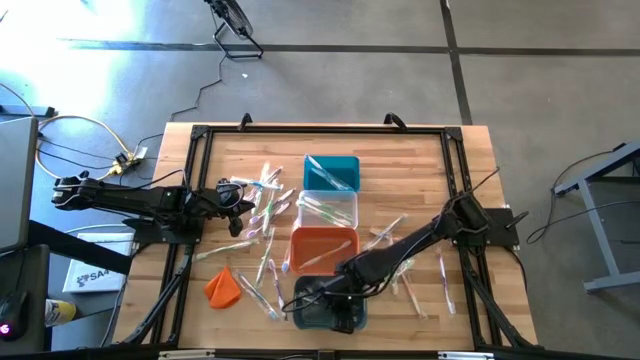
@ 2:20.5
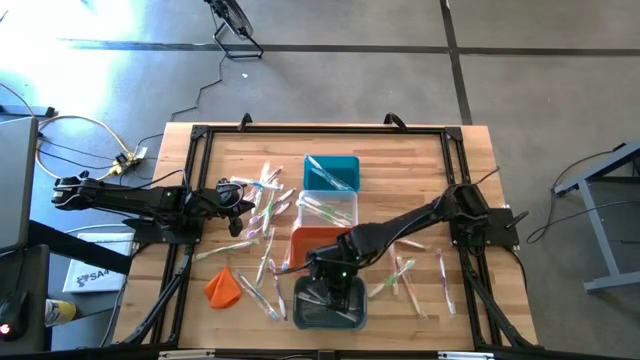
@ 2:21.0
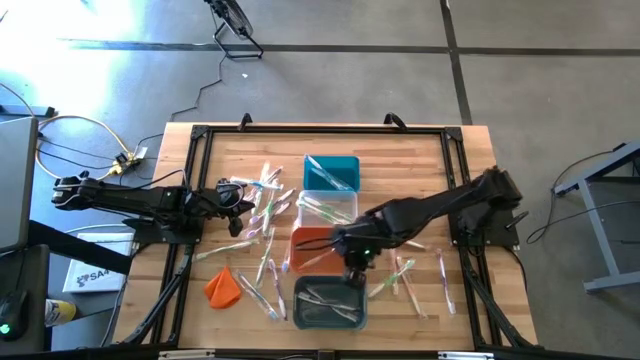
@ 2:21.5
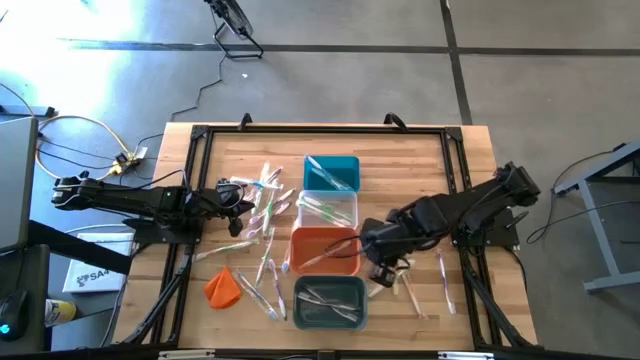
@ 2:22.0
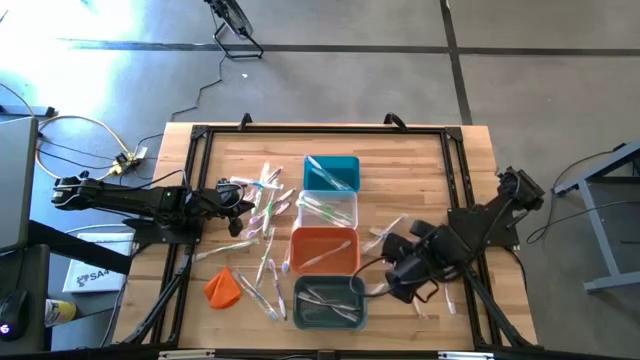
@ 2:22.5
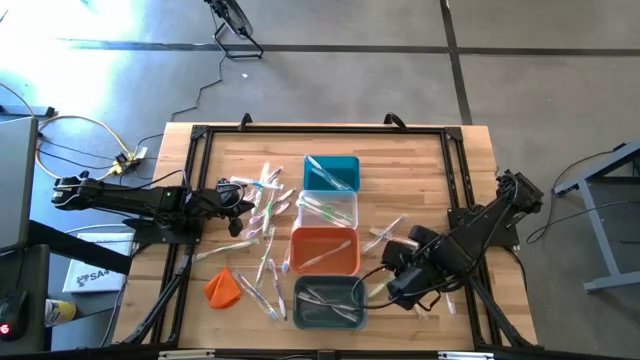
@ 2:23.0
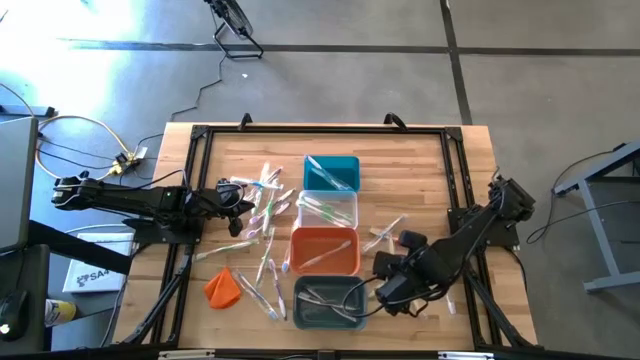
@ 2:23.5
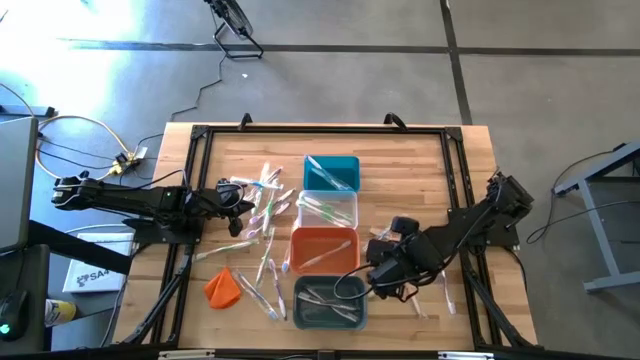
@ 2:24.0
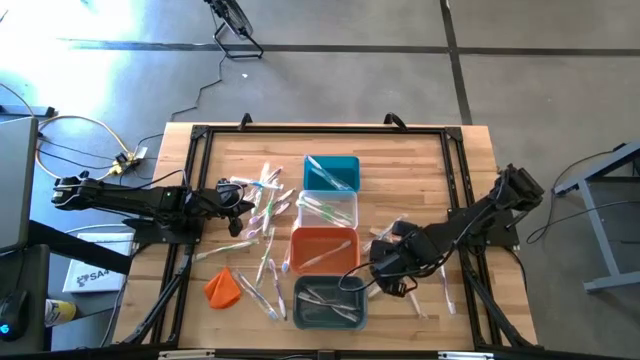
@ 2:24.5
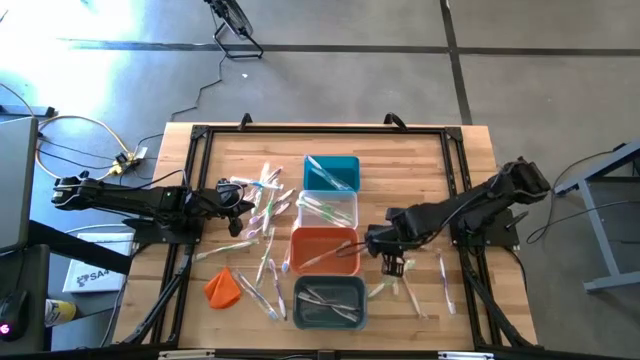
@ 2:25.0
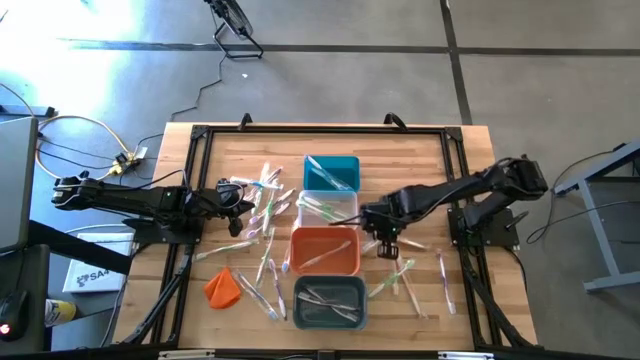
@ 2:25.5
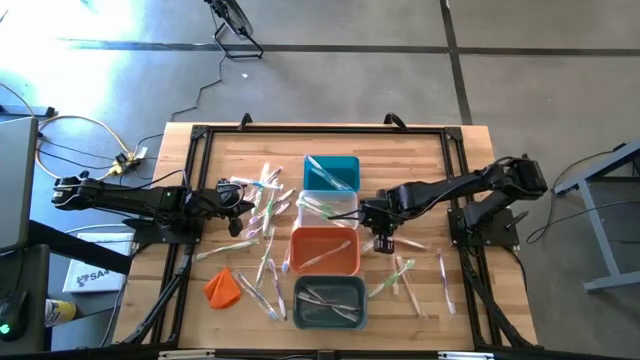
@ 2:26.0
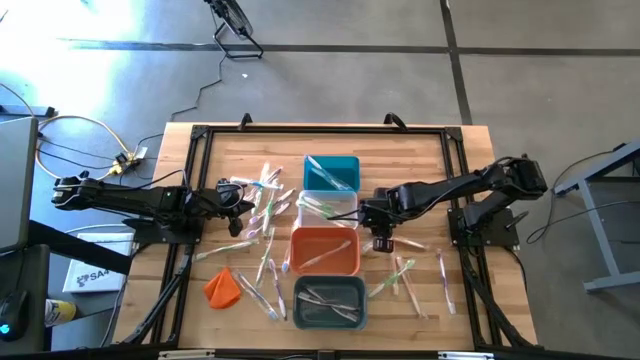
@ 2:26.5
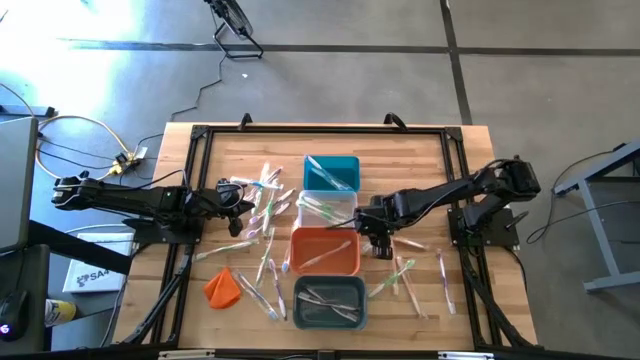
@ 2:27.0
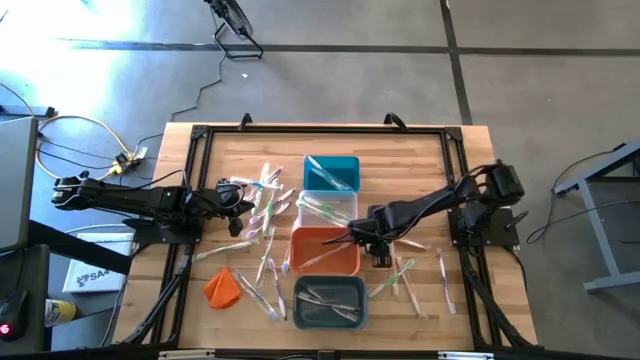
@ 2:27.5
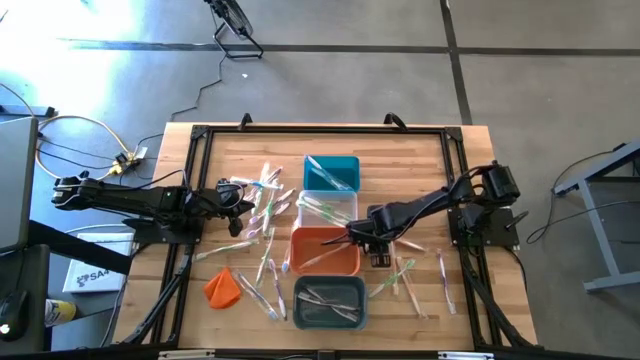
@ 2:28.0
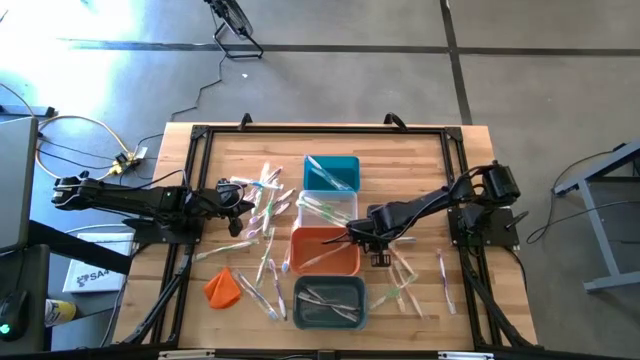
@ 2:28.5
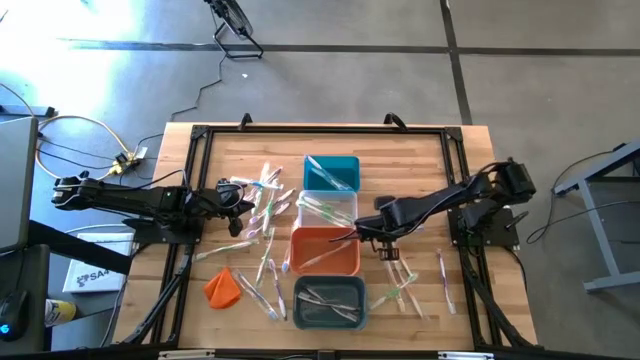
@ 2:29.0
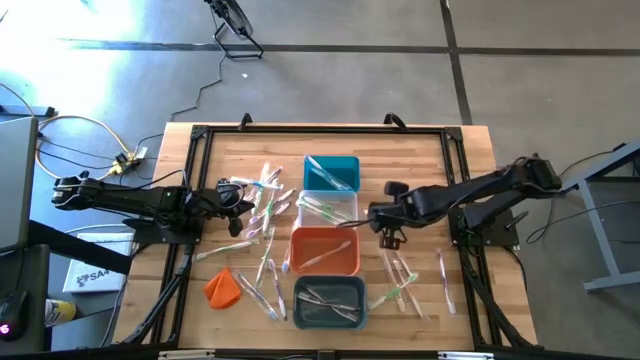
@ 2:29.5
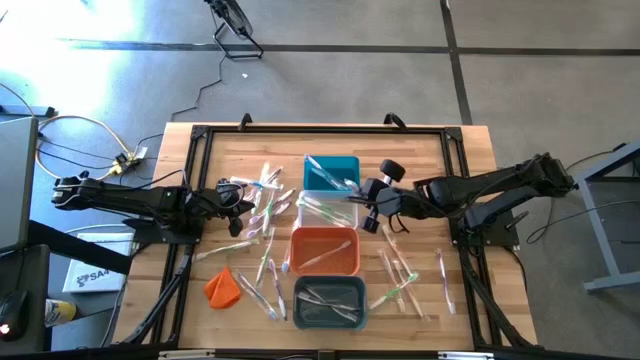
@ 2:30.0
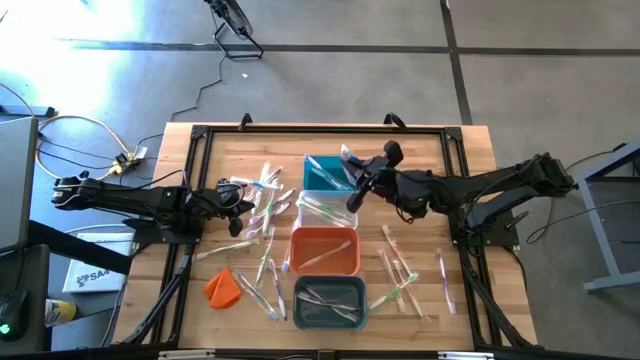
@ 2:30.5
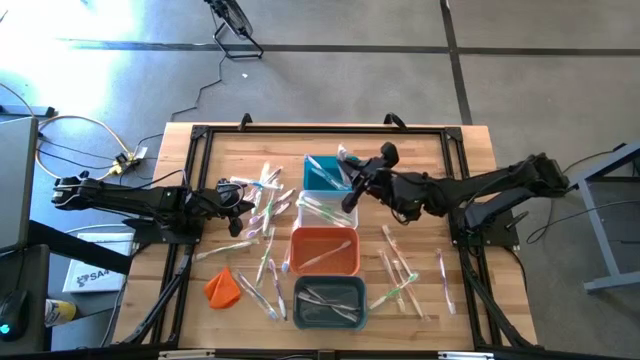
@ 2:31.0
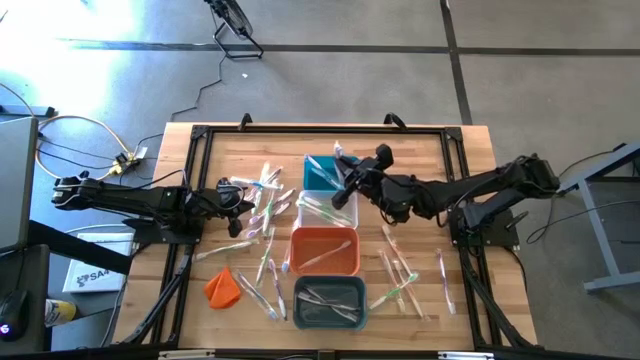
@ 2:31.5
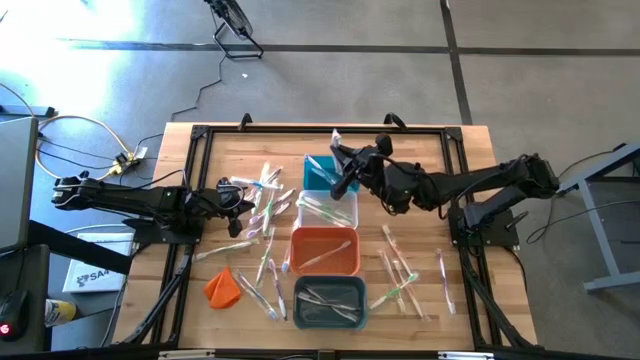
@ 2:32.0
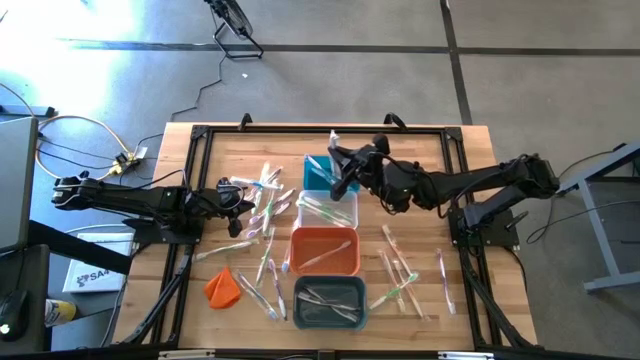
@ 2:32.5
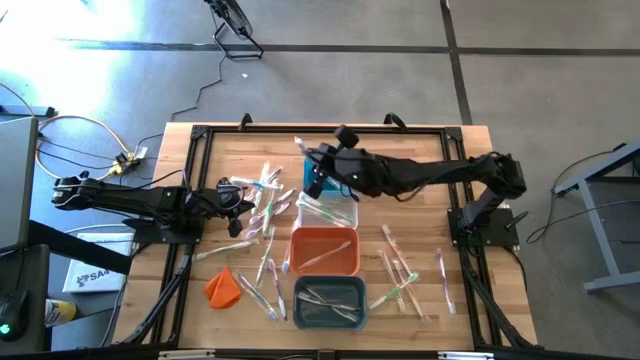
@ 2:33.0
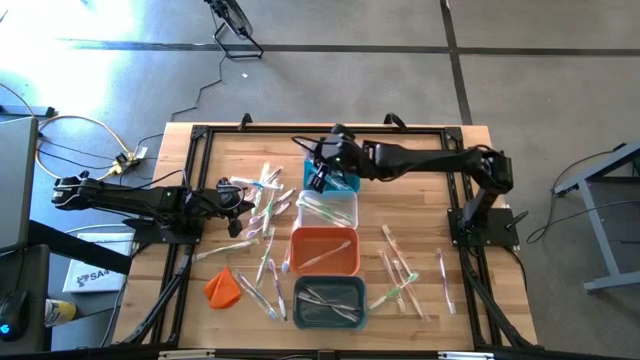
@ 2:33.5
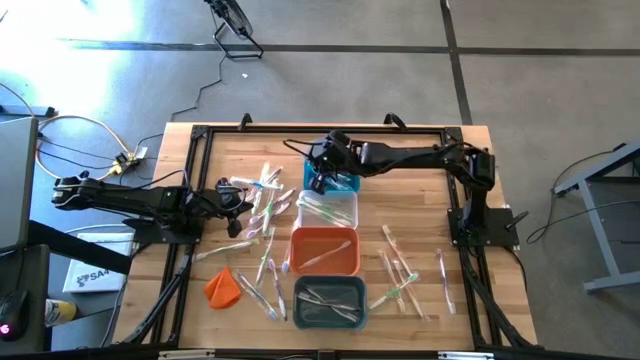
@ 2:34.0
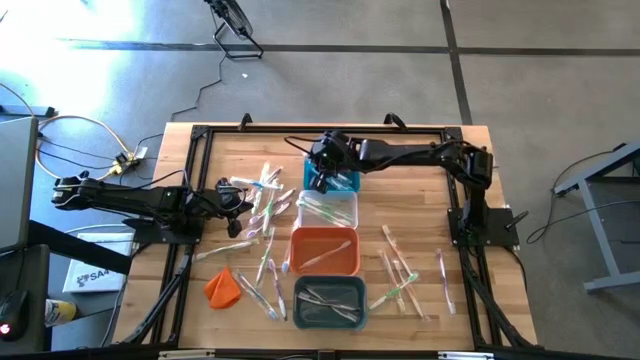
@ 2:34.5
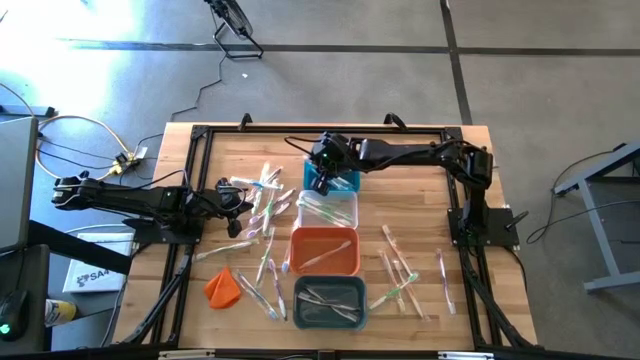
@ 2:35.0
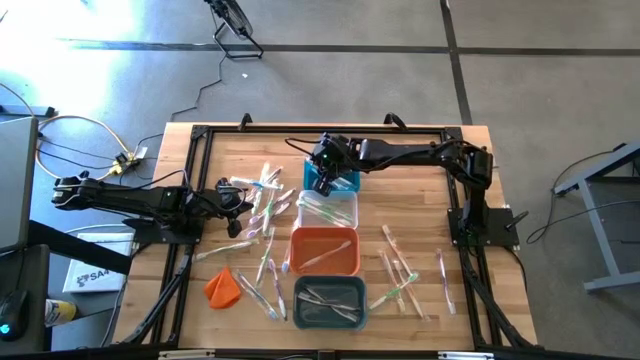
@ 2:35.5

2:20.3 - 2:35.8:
Task: Pick & Place Toothbrushes
Put the blue toothbrush into the blue bin

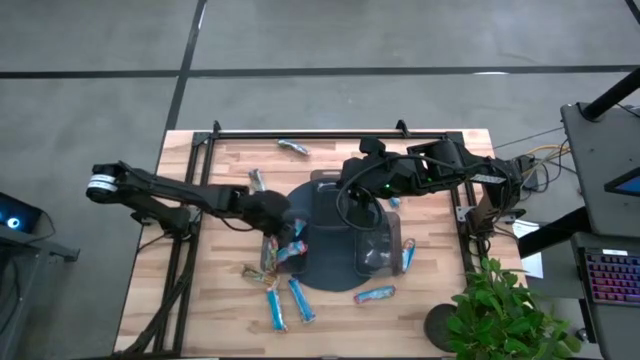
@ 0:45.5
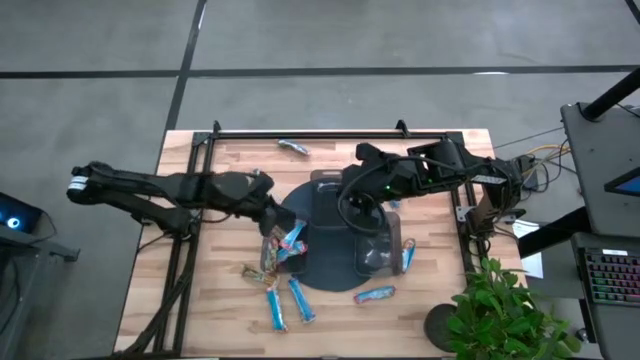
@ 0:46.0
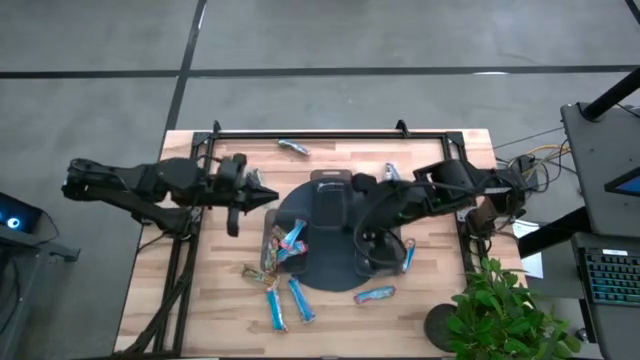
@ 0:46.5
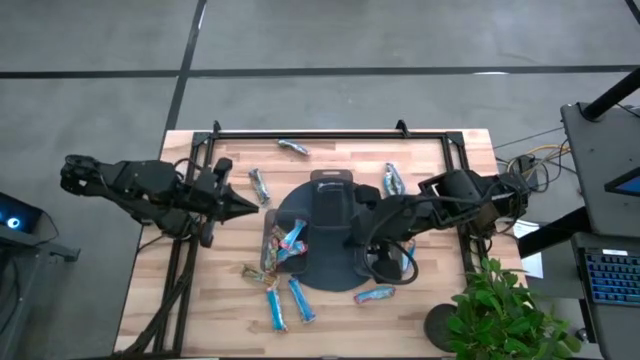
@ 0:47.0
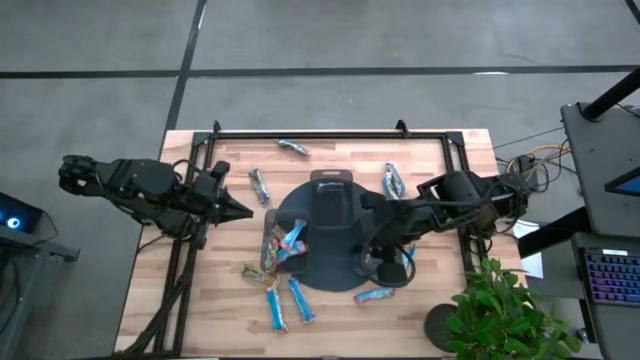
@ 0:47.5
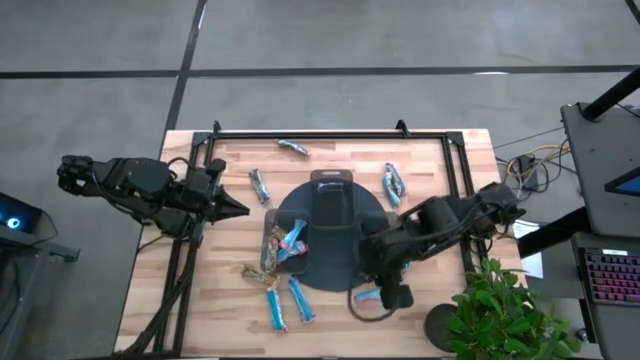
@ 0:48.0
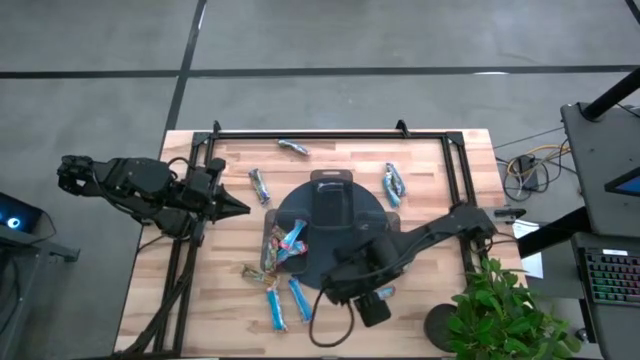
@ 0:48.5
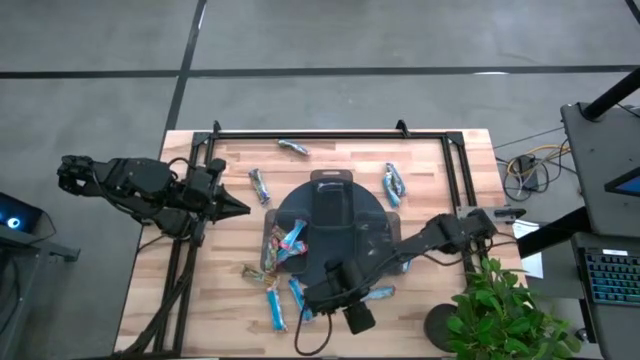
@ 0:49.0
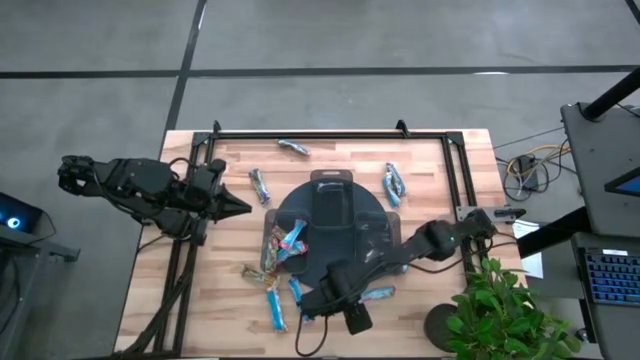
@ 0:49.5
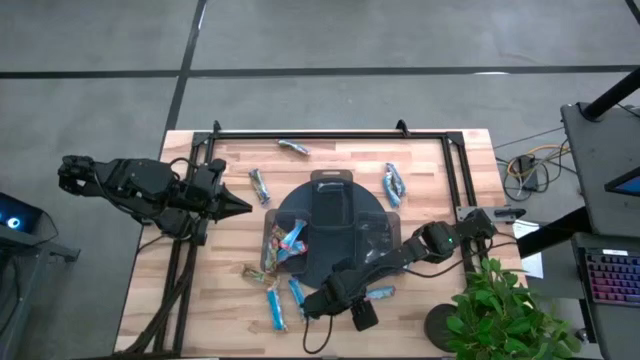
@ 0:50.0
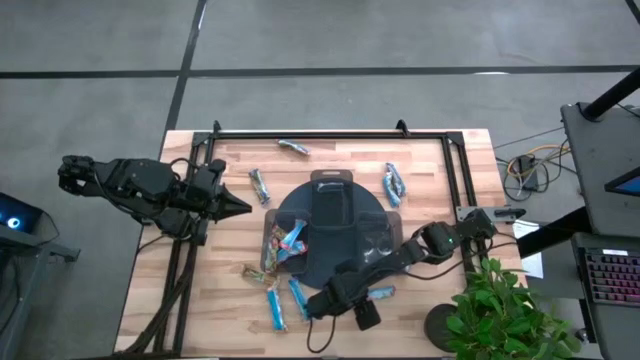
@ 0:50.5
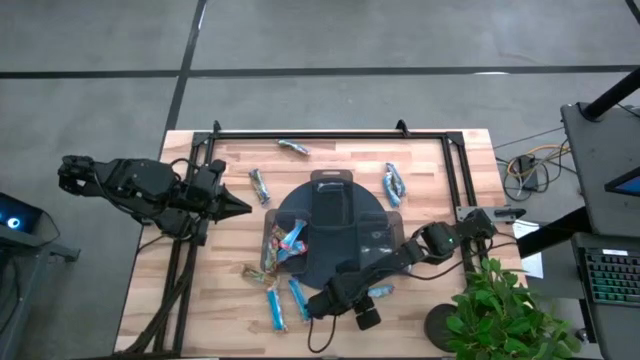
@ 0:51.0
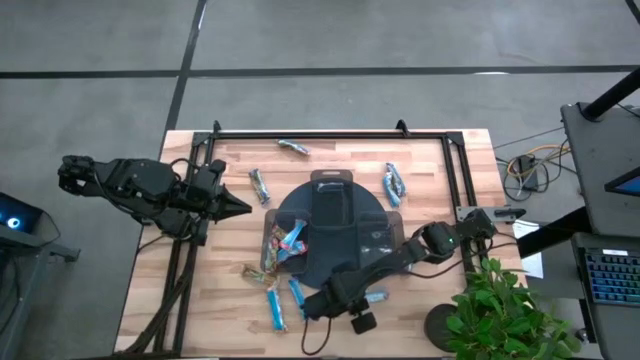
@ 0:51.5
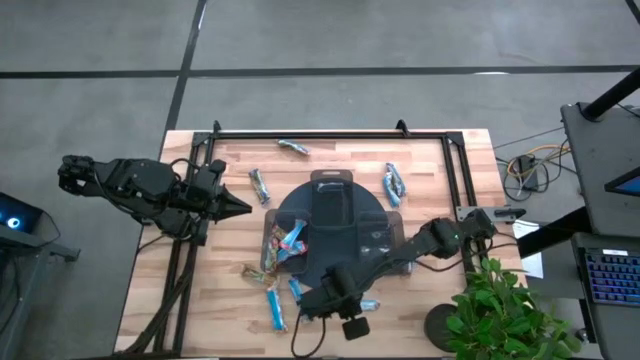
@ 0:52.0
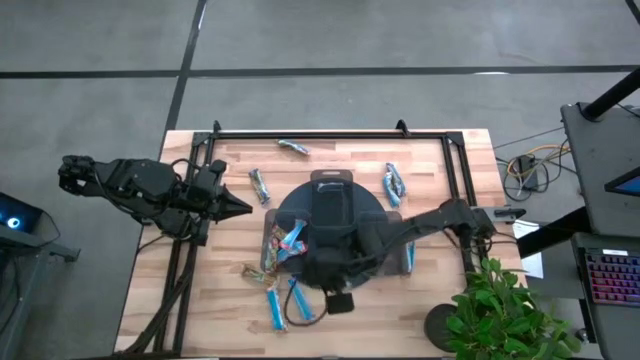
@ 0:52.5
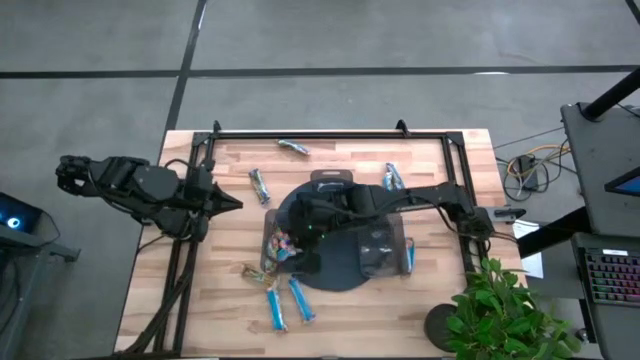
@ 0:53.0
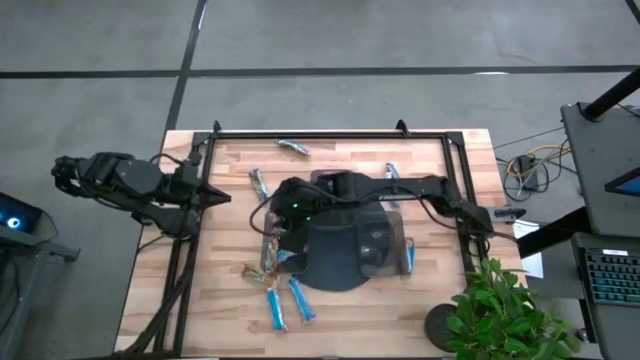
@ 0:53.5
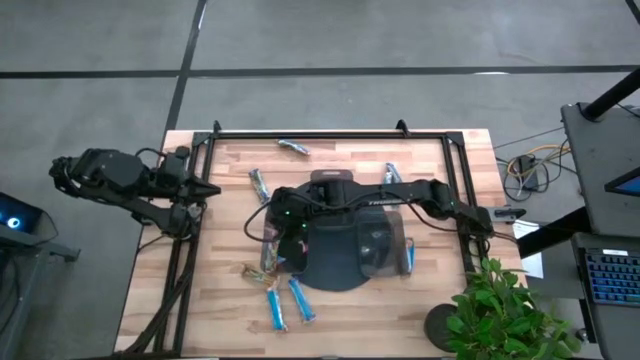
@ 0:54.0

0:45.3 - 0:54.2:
Task: Pick and place Granola Bars by type
Put the red granola bar into the bottom left black bin
